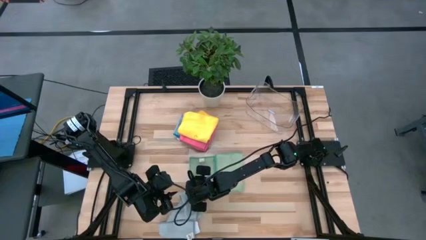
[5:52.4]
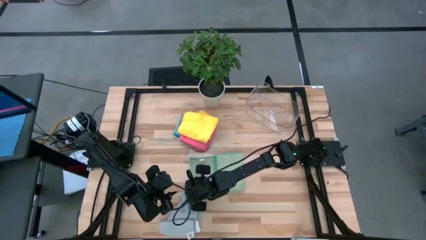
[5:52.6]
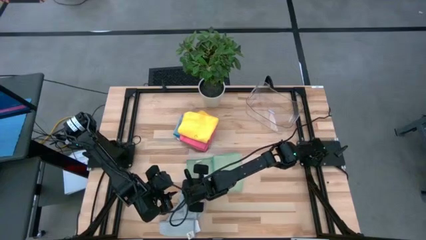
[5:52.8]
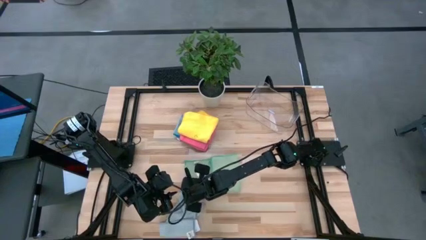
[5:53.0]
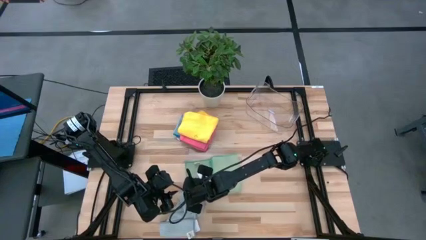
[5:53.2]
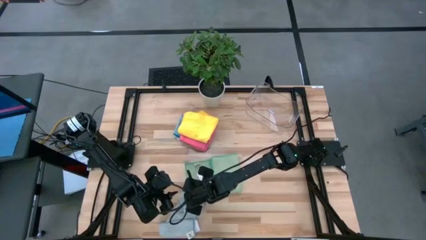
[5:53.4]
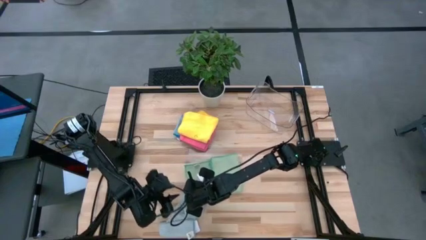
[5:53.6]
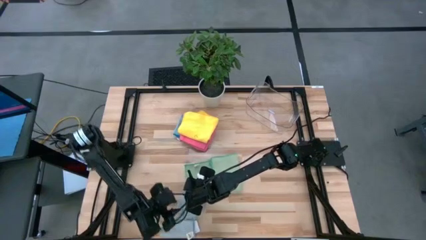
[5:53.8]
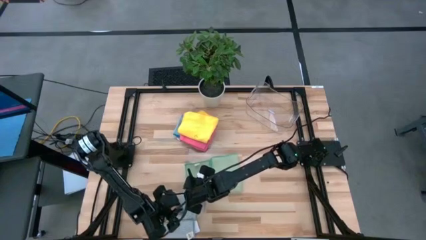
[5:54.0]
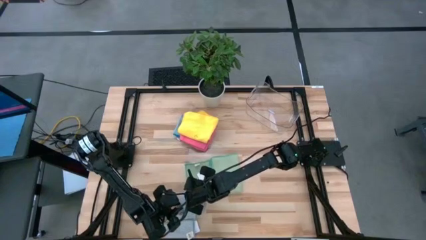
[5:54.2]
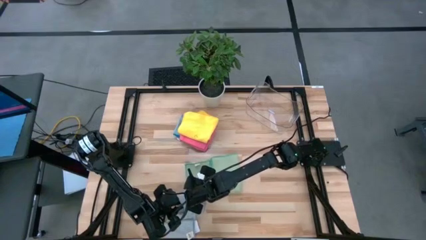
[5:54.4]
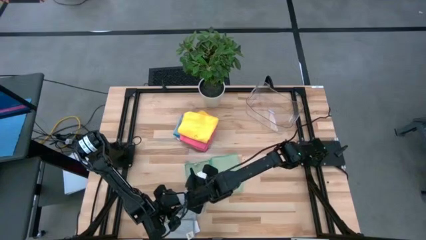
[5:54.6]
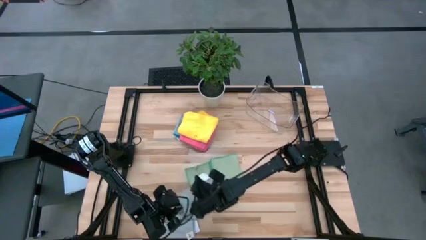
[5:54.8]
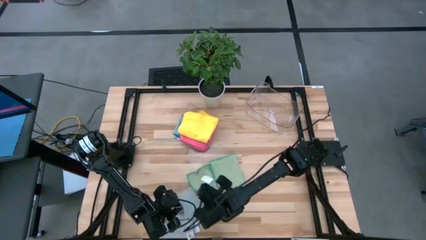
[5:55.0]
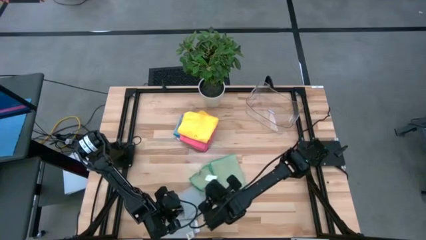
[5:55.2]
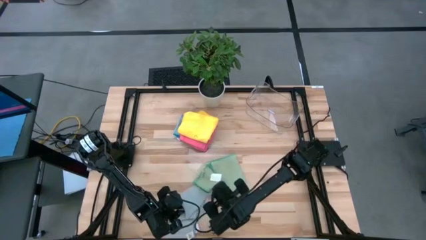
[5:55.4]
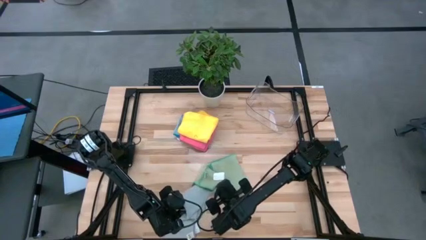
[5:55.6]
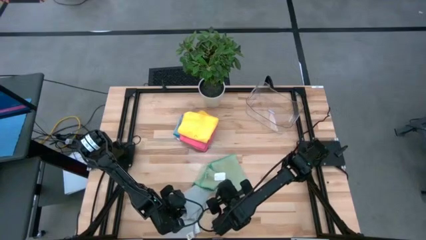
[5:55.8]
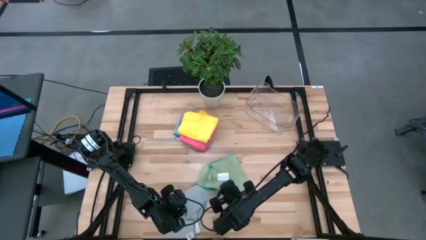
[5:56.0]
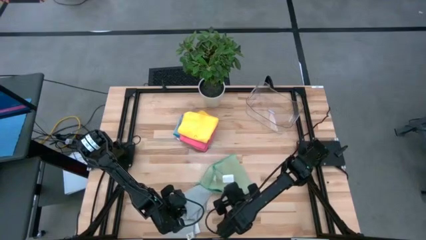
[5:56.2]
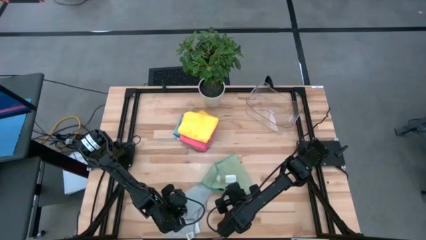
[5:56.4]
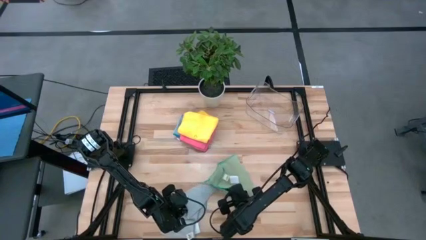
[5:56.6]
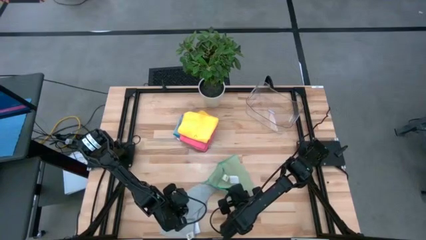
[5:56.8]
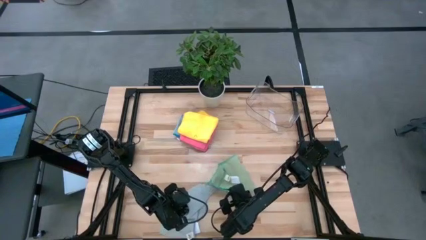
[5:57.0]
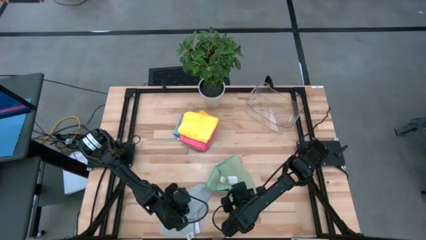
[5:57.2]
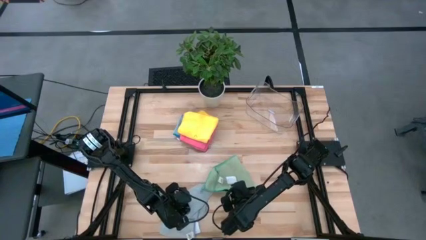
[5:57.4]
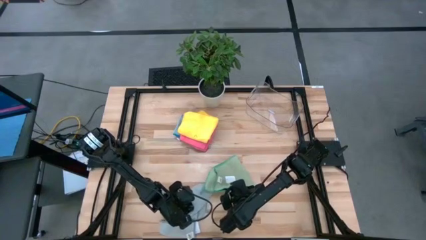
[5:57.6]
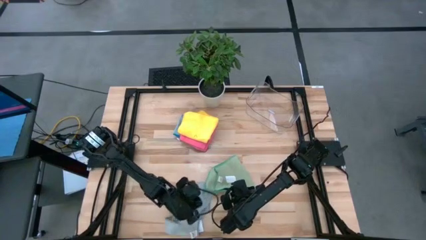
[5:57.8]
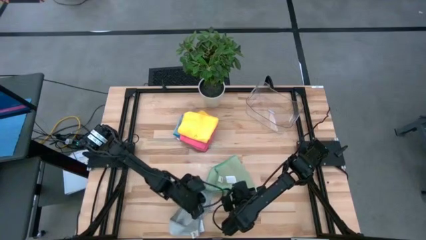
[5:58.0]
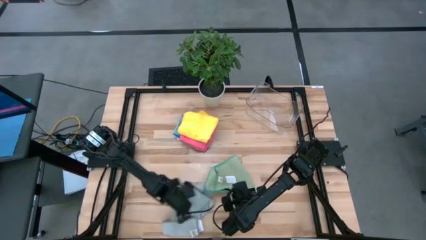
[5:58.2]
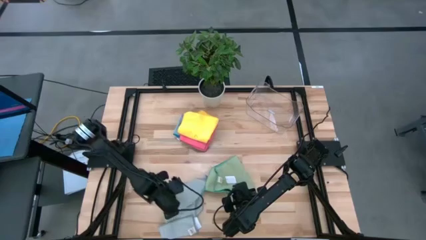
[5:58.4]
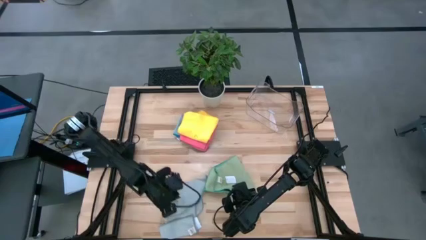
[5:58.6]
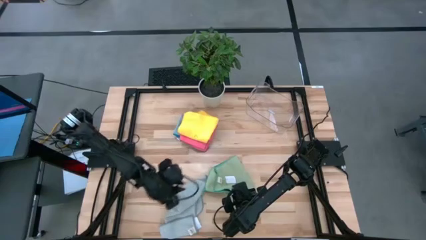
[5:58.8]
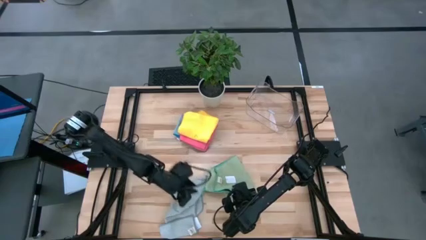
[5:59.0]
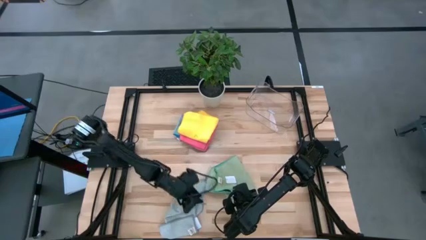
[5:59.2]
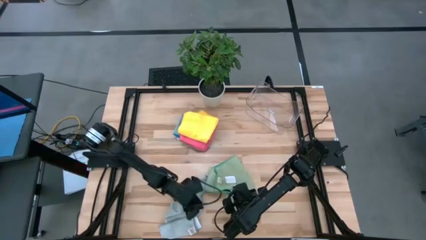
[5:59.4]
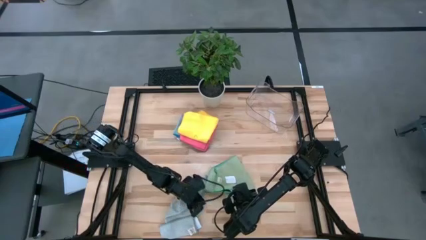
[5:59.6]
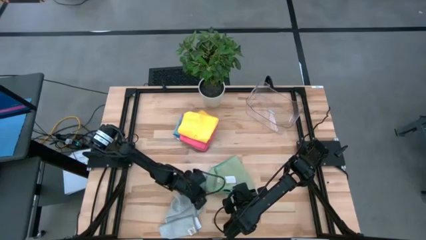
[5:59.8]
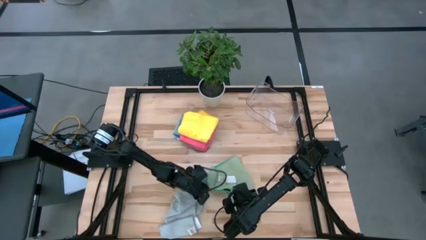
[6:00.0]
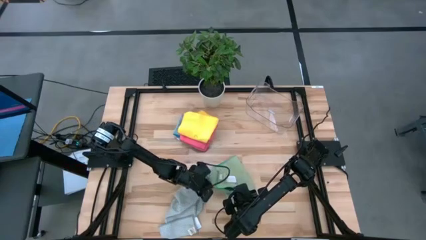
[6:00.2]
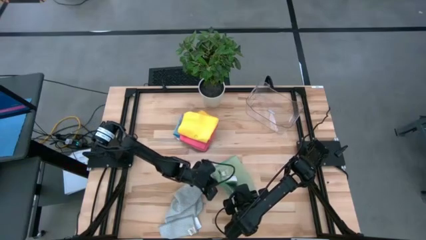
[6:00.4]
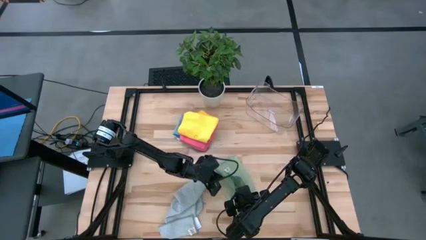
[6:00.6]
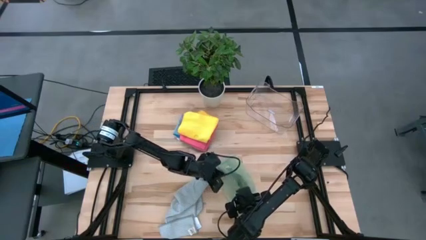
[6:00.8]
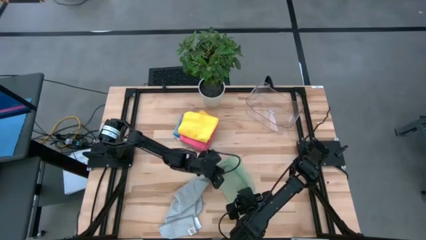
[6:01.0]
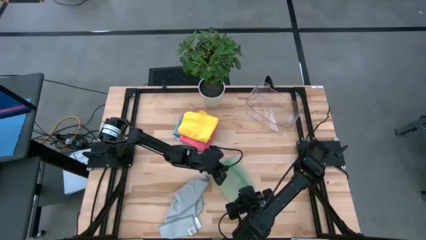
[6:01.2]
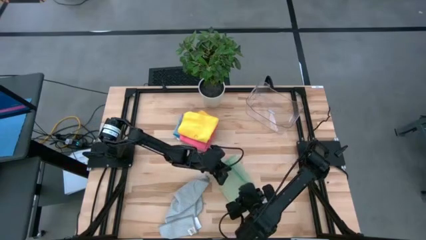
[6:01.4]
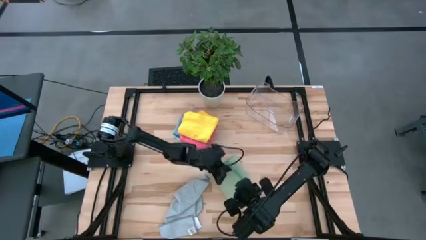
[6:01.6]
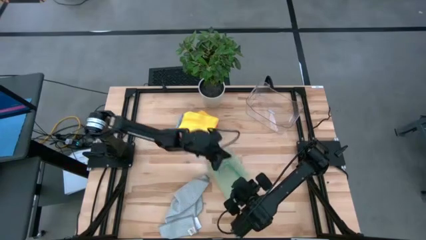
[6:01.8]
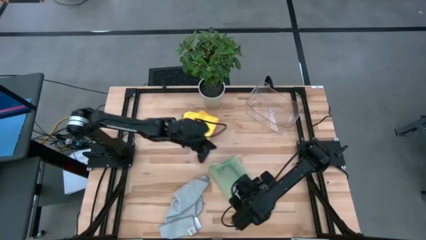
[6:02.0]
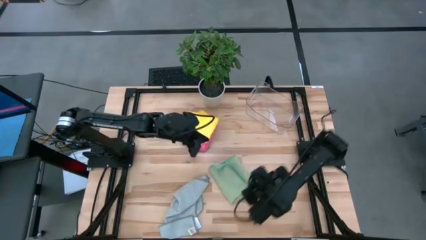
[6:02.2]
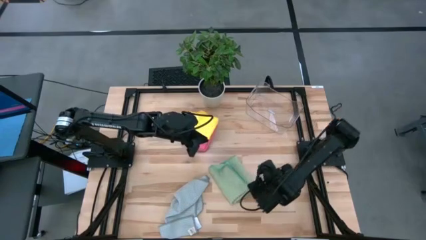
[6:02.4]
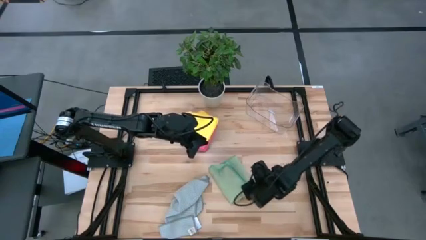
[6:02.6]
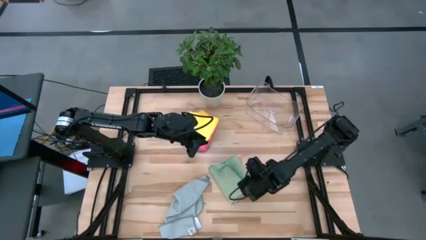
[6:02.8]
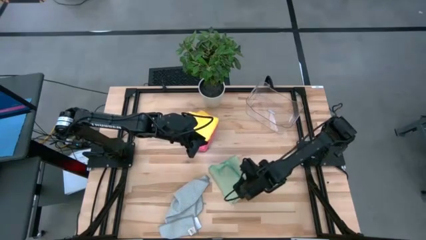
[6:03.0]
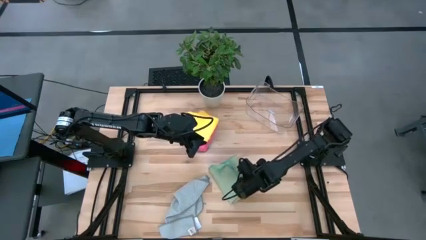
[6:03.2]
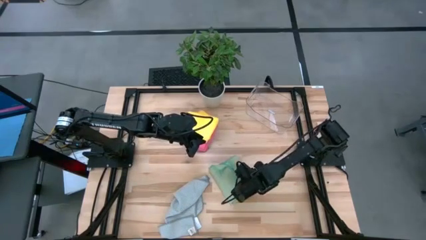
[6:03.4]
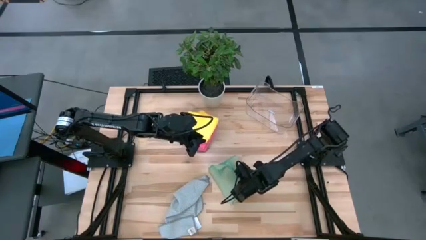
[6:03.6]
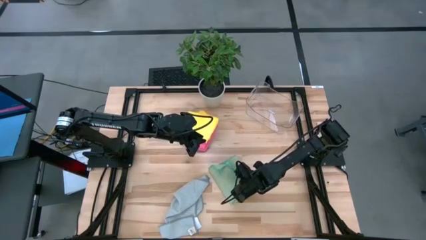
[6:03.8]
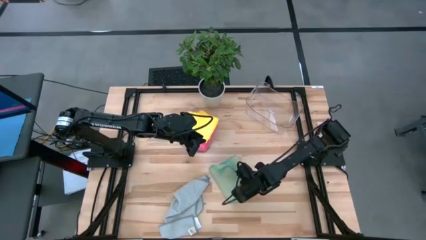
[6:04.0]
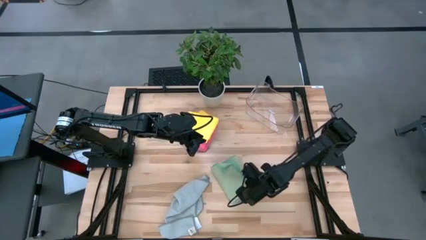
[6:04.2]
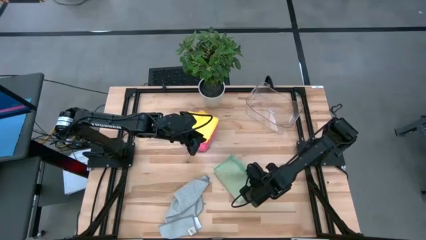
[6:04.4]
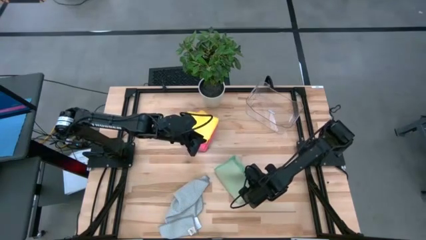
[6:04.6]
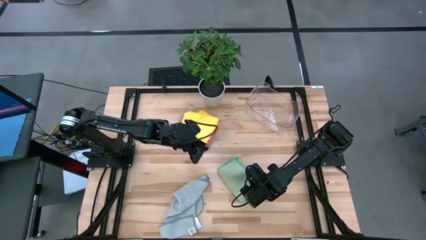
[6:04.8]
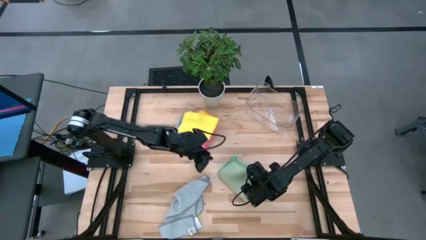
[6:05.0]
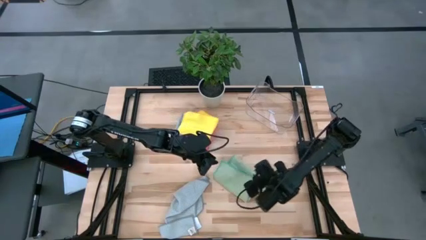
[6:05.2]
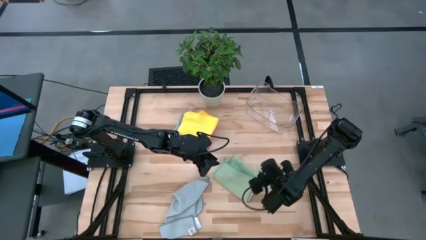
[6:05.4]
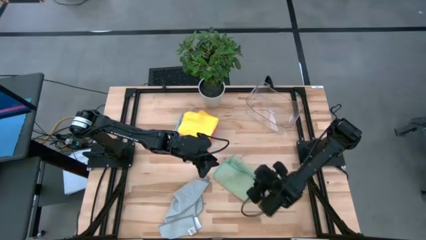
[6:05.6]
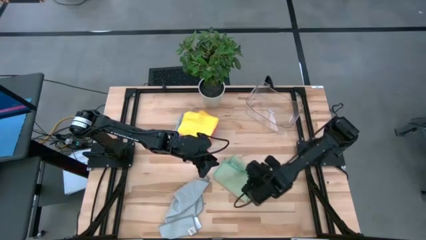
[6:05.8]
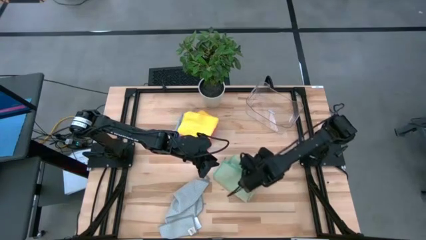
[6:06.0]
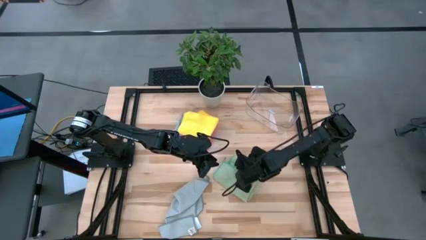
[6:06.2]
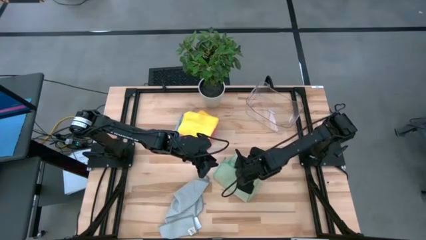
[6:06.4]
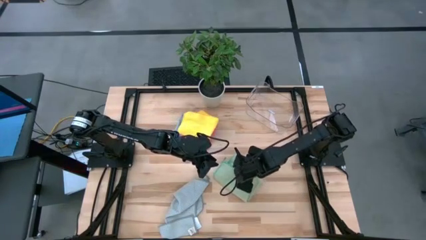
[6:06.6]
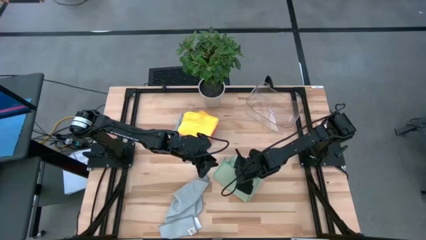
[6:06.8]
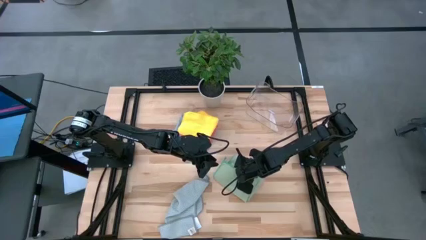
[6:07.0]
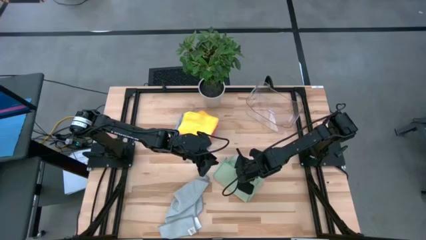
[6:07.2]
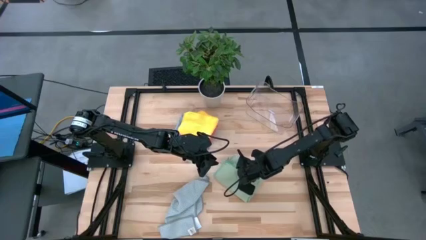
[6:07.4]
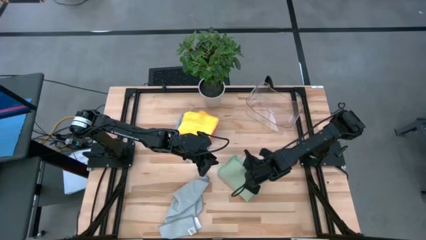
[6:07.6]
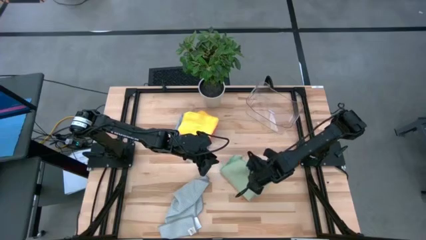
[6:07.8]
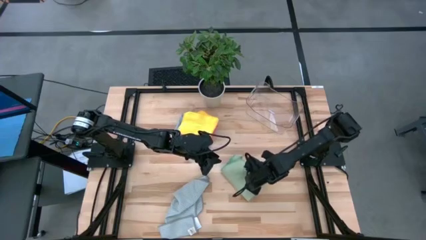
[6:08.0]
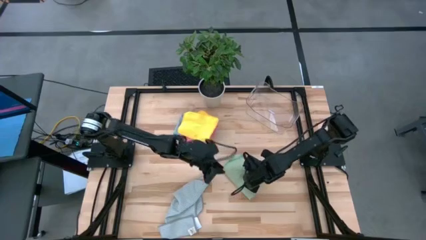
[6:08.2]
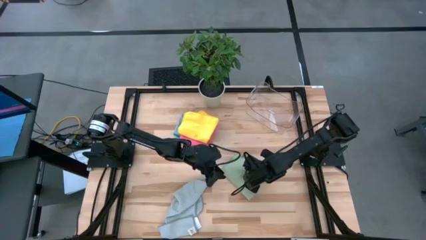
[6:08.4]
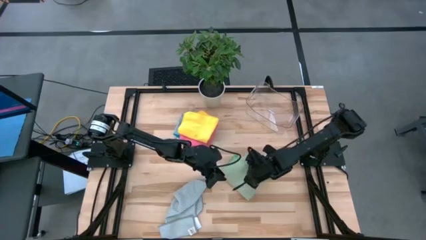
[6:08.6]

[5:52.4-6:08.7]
Task: Fold microfiber towels
Fold the light green microfiber towel
